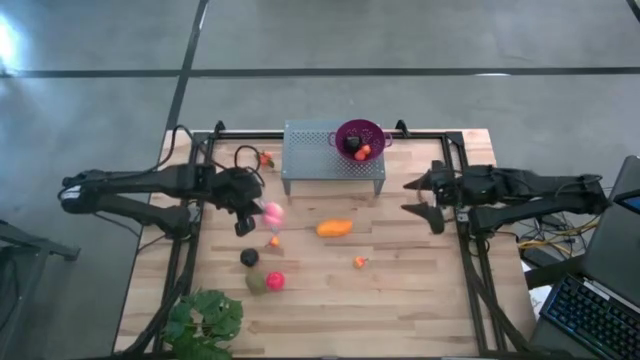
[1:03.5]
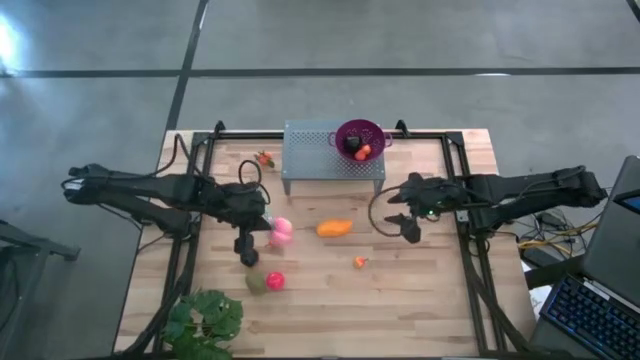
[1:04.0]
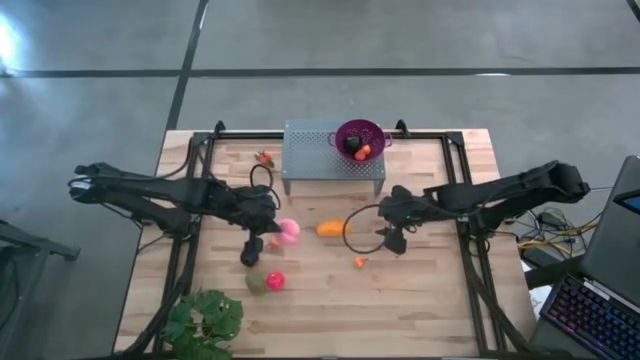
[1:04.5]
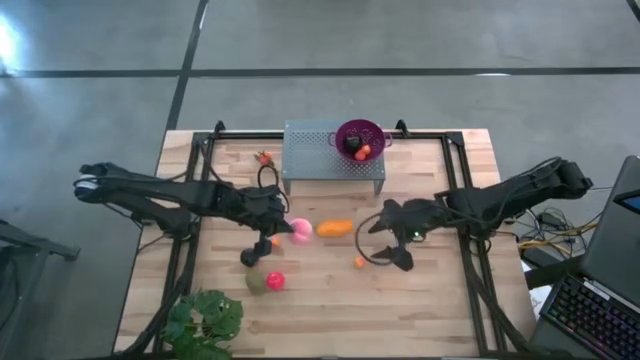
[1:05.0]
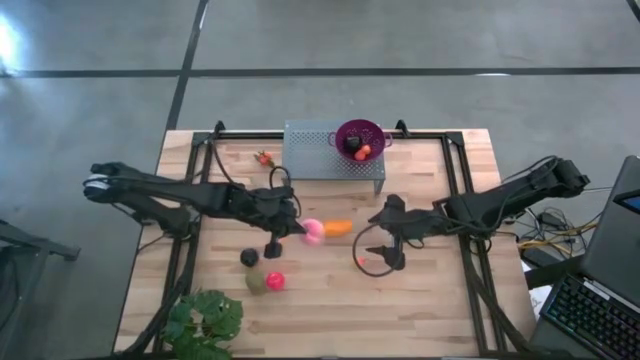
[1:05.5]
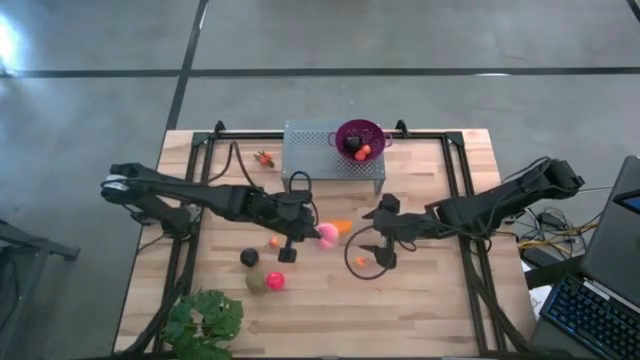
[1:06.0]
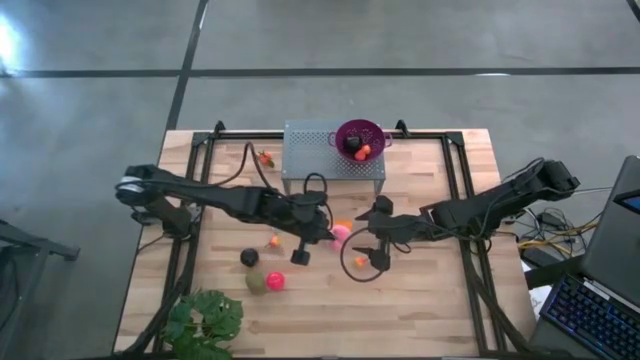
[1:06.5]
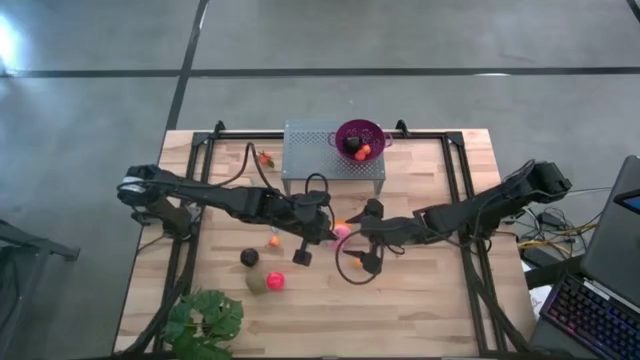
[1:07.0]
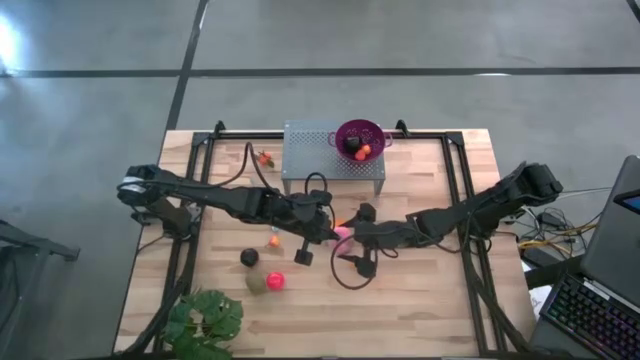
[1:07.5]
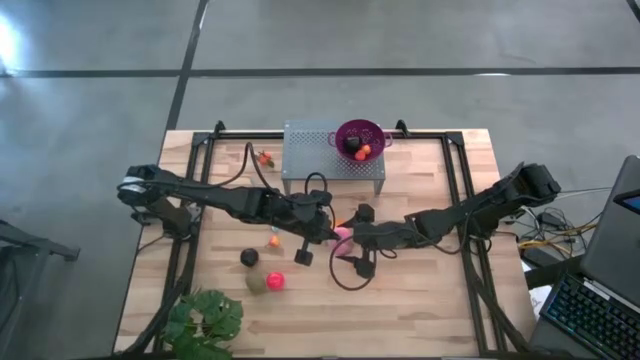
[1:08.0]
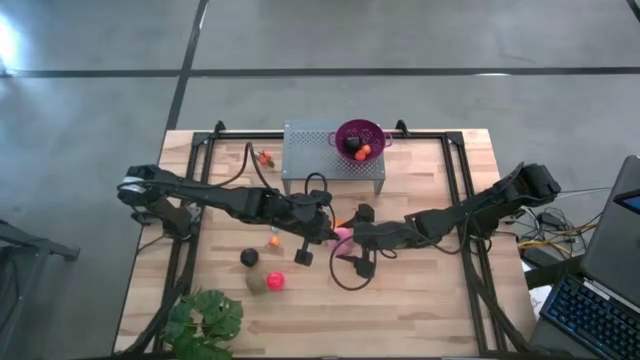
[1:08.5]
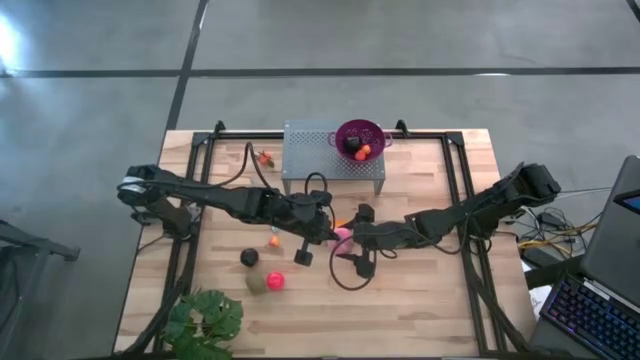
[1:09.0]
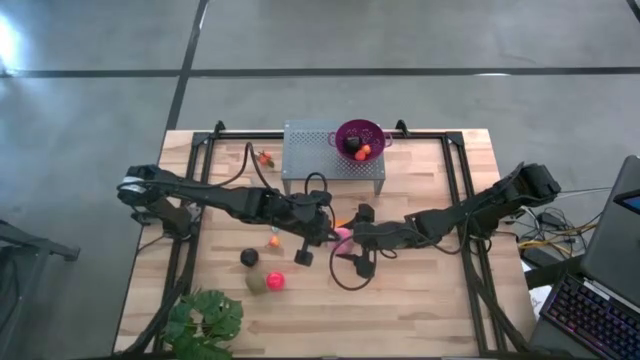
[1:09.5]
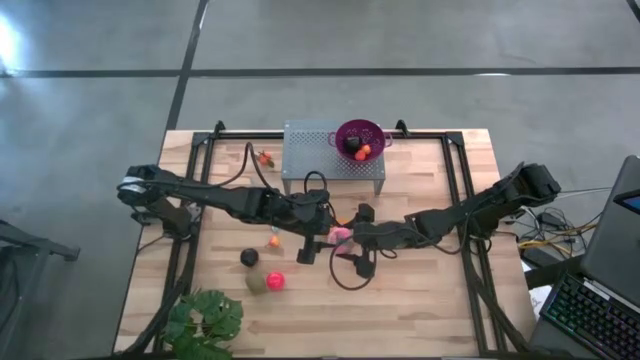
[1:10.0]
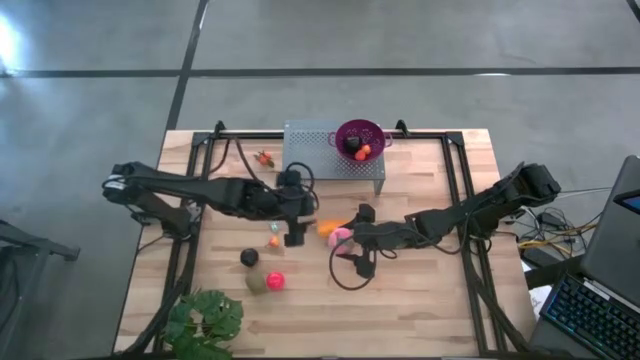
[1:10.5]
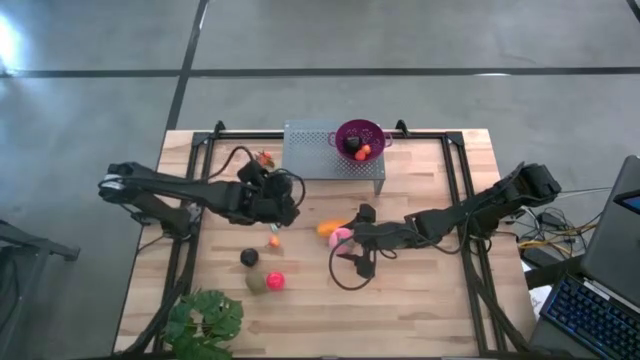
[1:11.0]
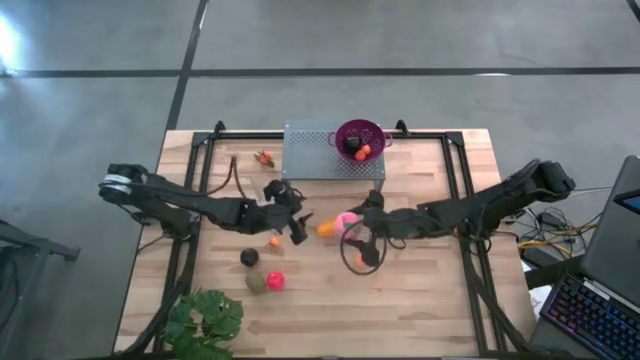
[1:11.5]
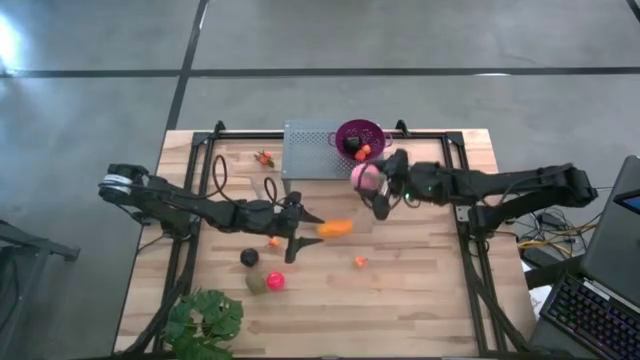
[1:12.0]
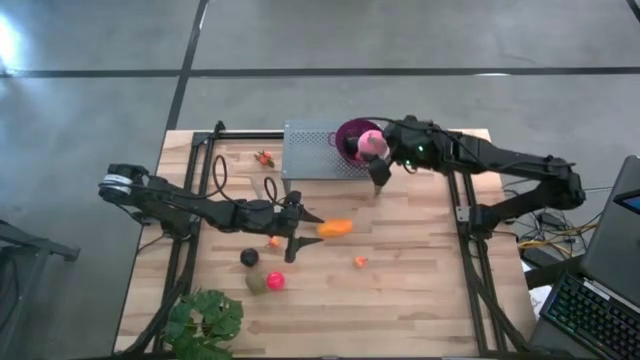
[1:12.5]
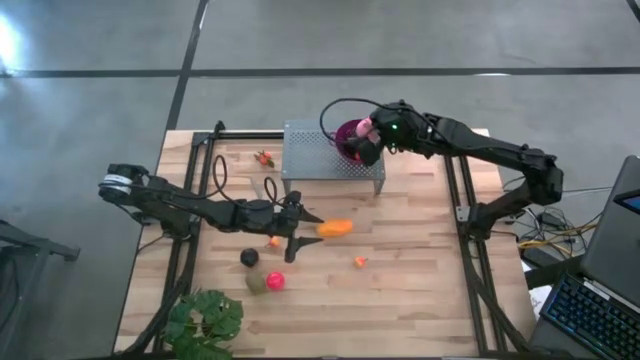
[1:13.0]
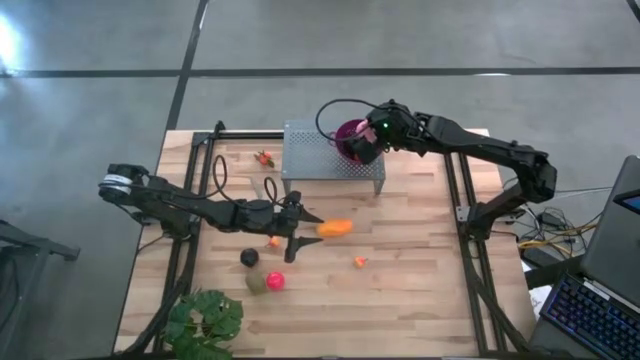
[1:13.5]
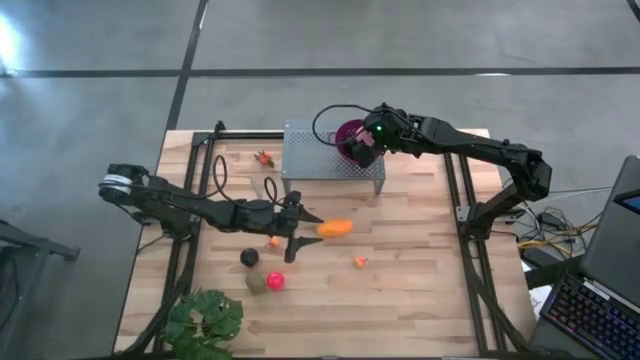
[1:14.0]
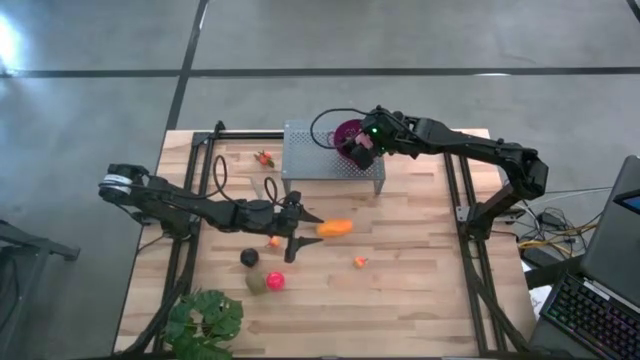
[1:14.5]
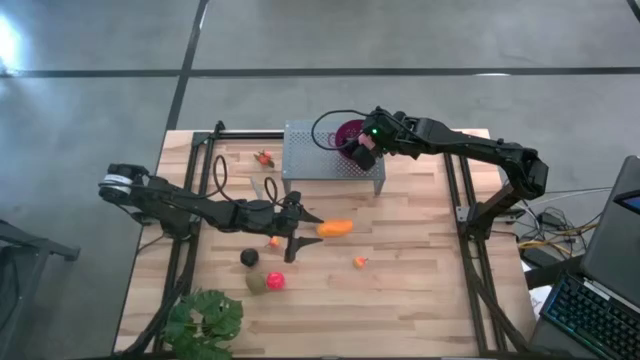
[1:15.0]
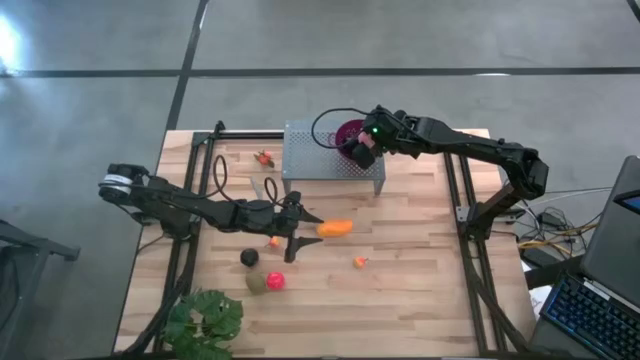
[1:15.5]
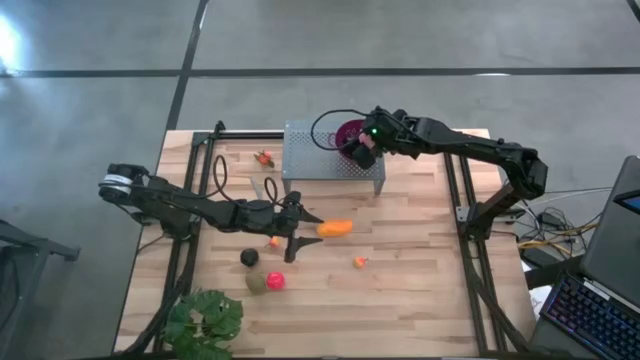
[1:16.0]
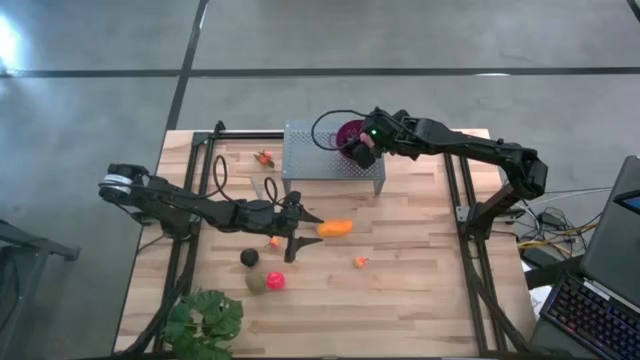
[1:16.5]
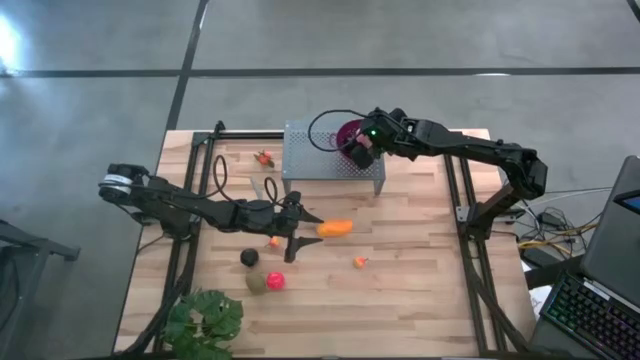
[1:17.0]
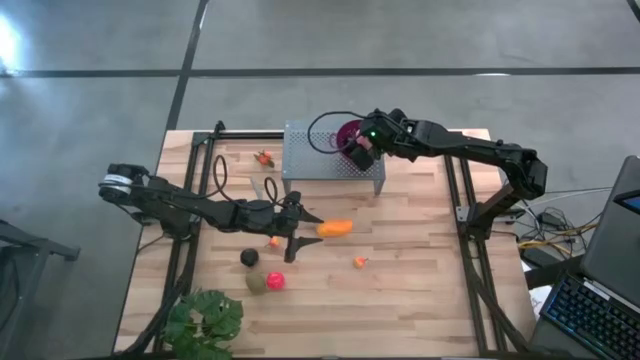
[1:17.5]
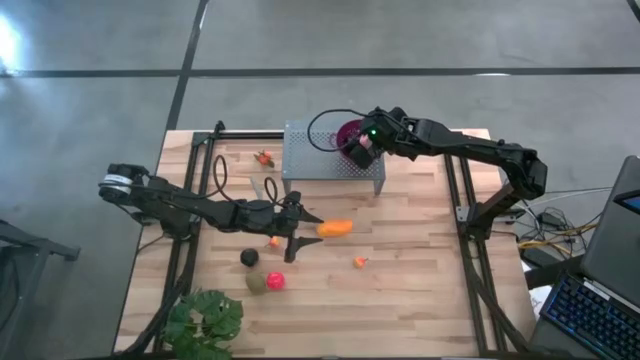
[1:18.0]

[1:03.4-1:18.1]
Task: Pick & Place Fruit
Put the peach into the purple bowl on the shelf

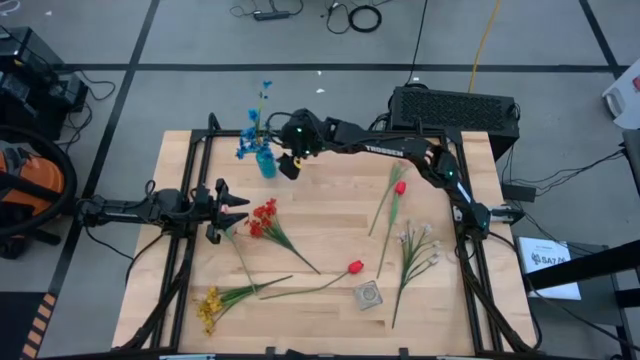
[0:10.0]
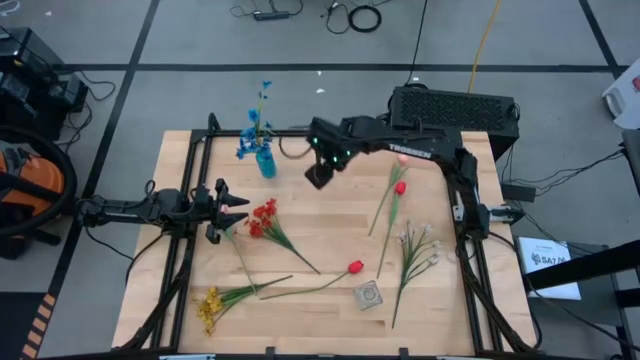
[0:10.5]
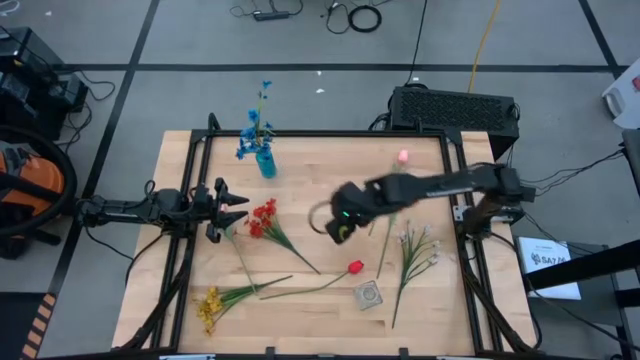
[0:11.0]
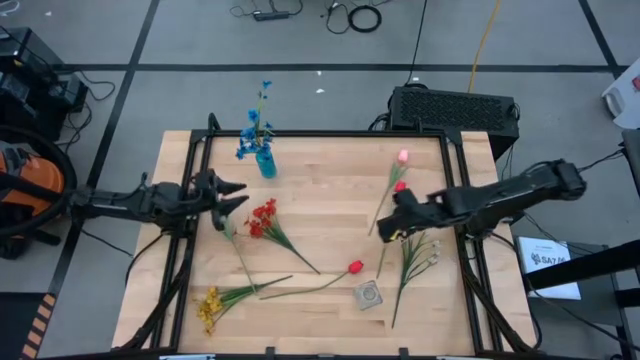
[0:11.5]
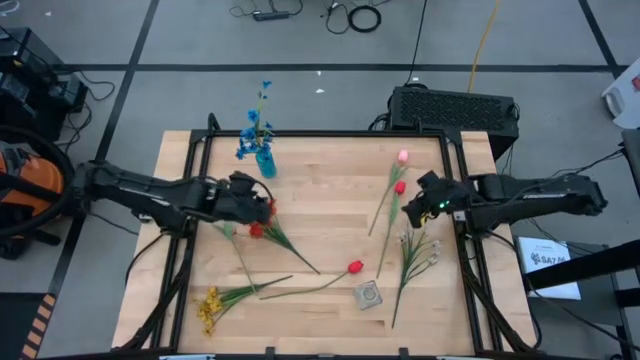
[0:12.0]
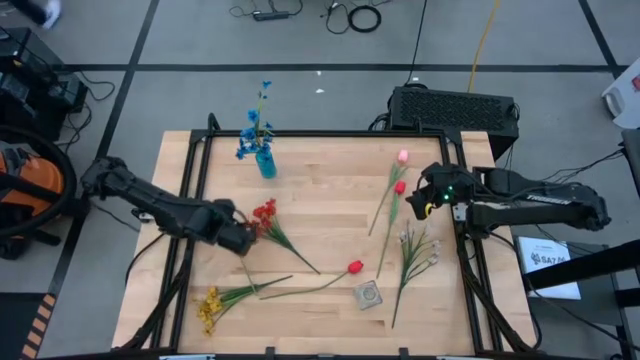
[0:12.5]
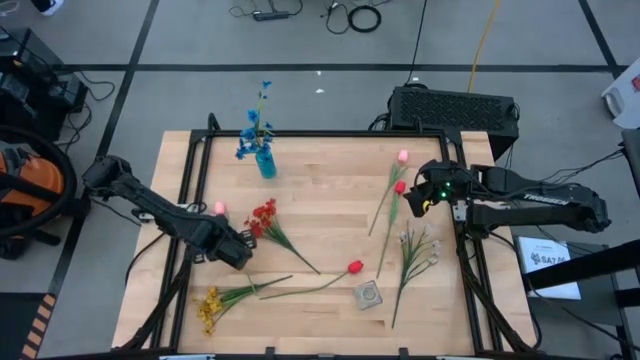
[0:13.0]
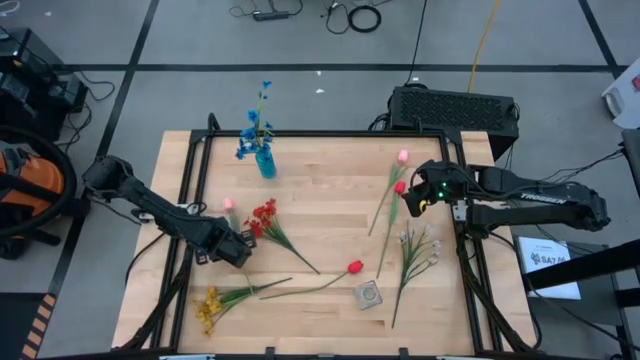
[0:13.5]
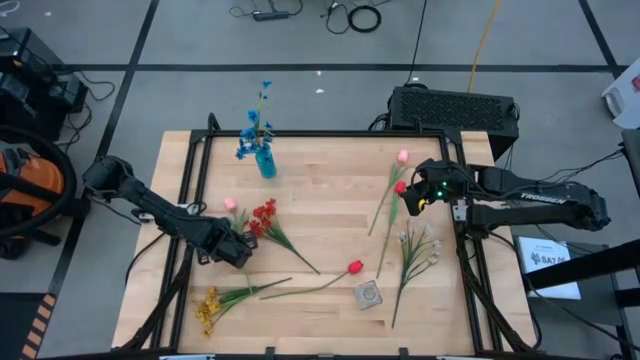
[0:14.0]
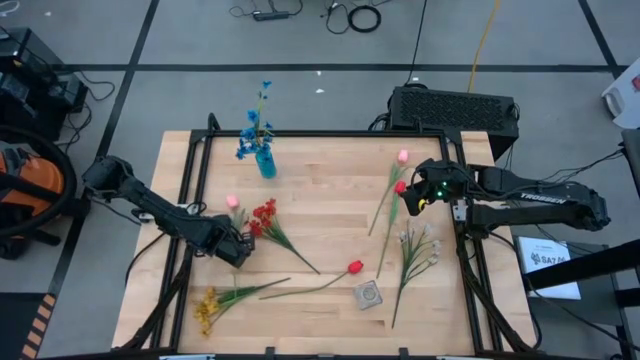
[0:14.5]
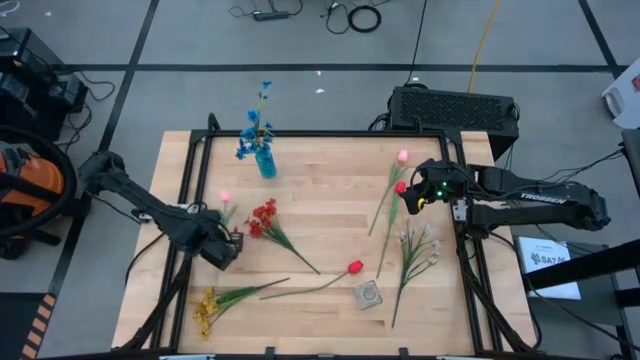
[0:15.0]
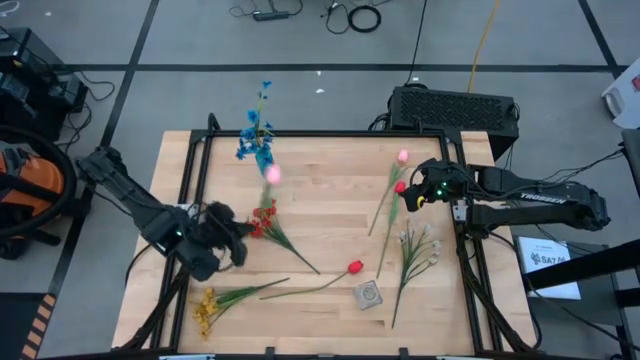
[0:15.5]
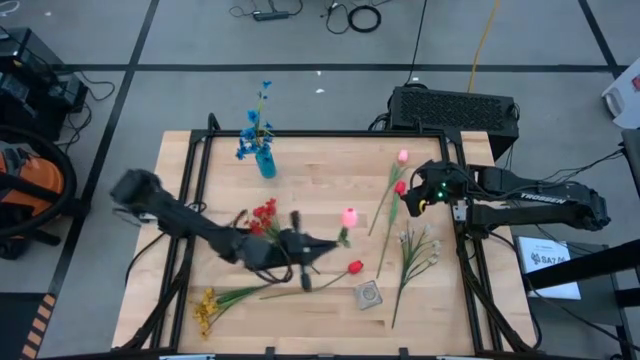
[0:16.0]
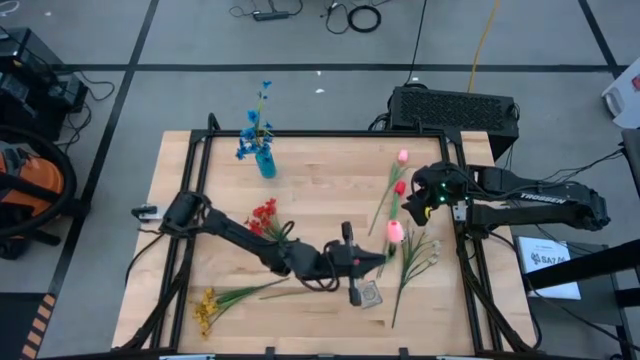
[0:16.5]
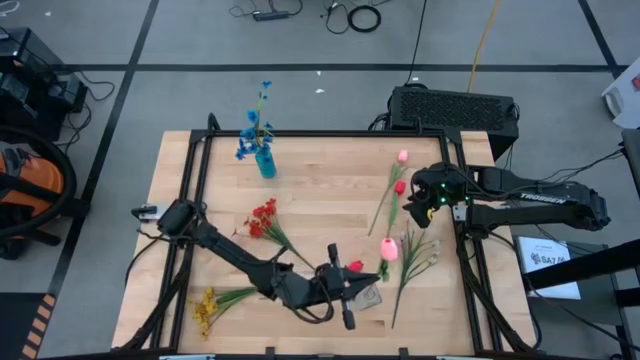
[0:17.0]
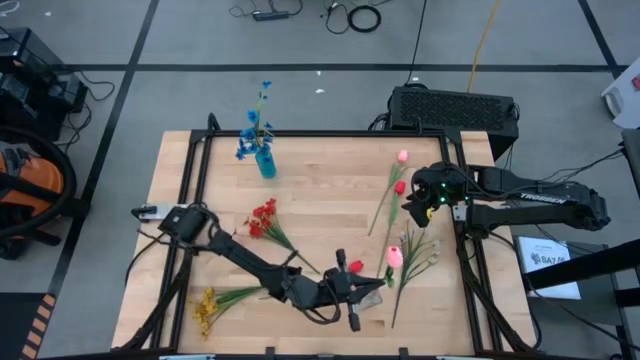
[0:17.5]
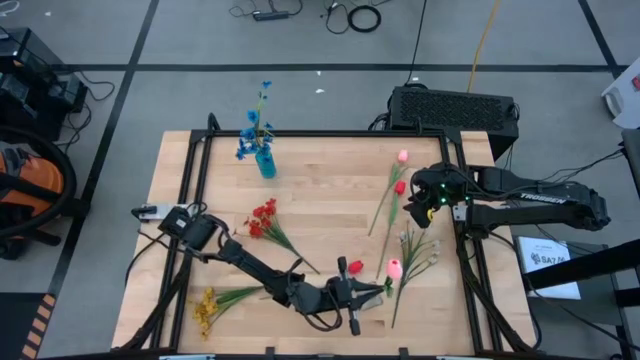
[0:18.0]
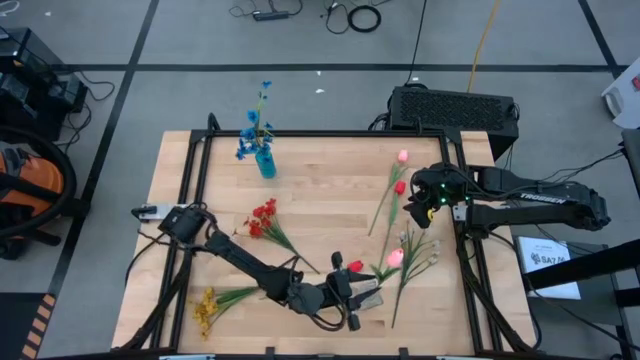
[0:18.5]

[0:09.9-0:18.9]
Task: Sort flowers into vase by color
Put the left pink flower into the transparent vase
